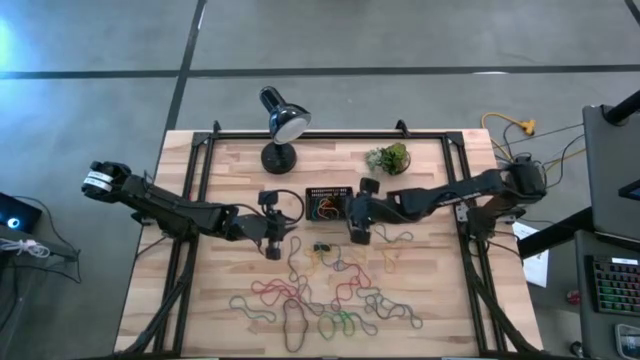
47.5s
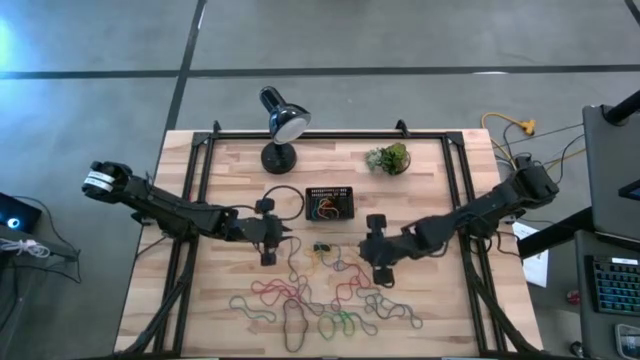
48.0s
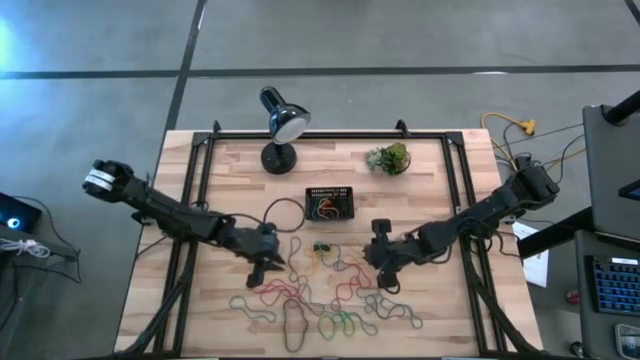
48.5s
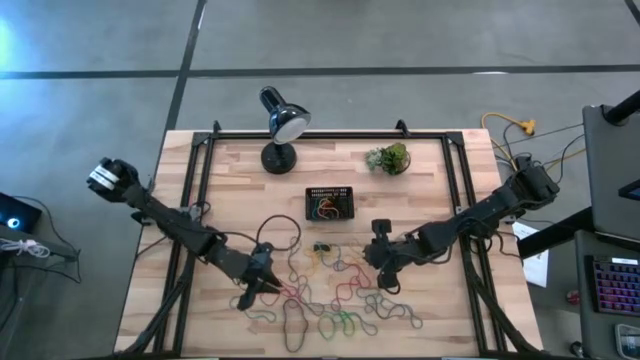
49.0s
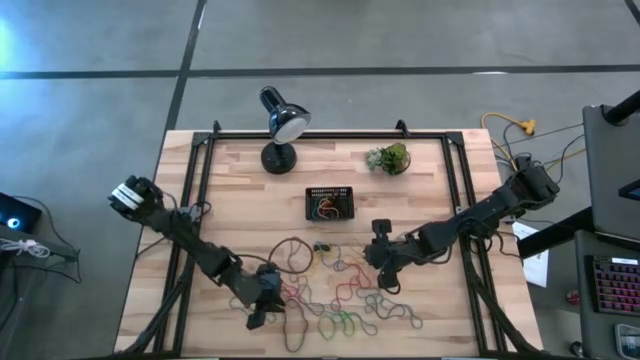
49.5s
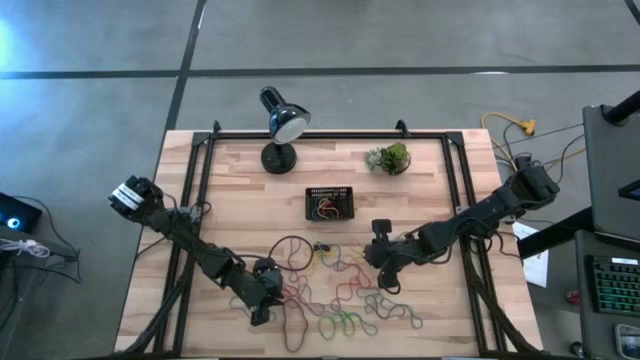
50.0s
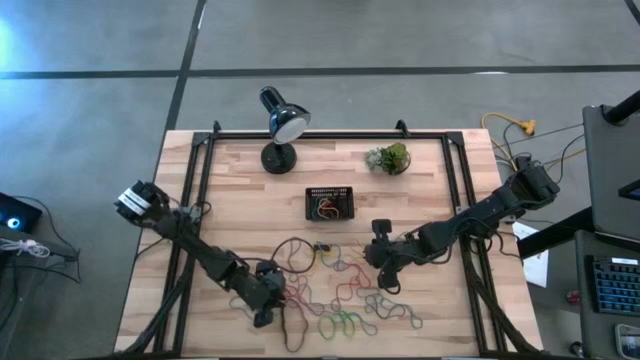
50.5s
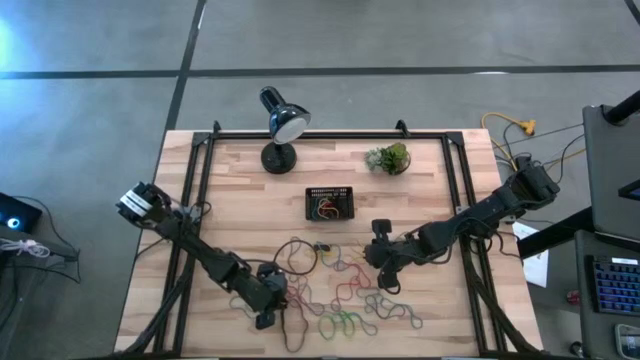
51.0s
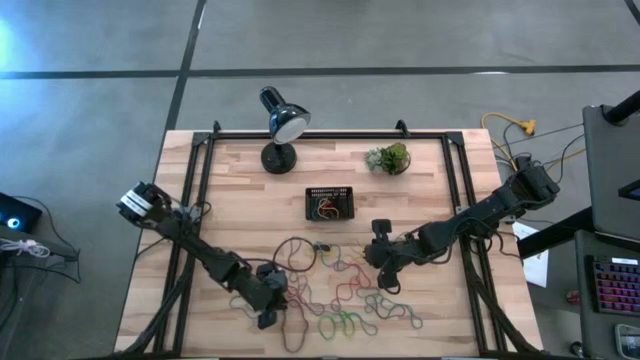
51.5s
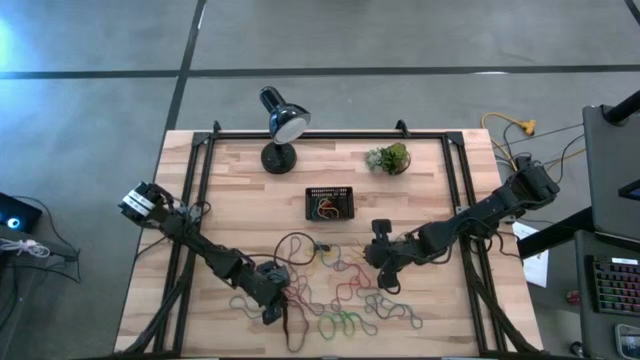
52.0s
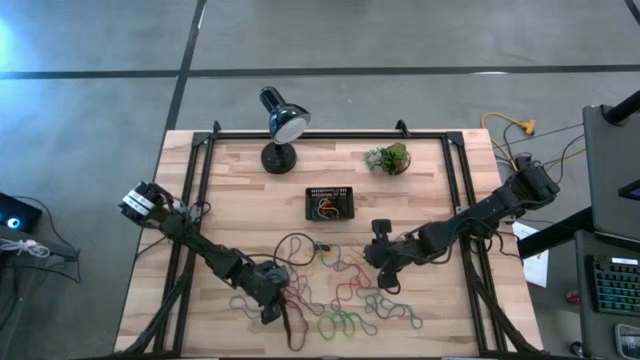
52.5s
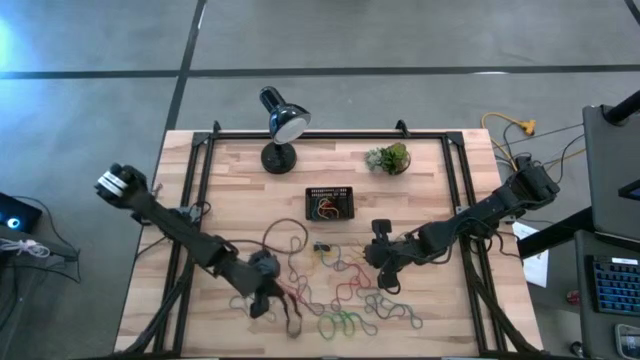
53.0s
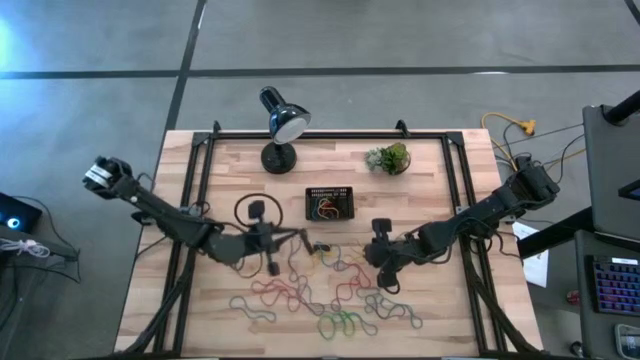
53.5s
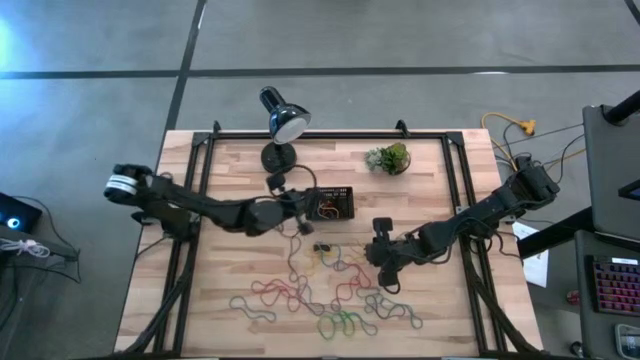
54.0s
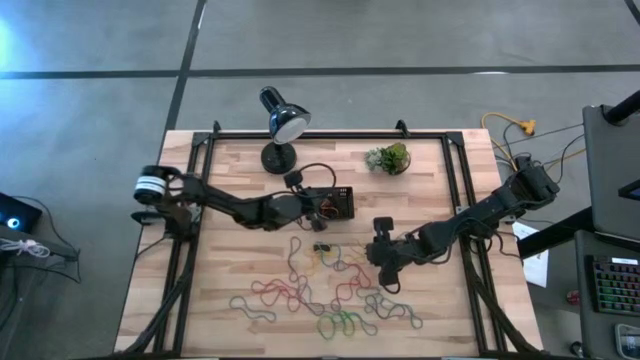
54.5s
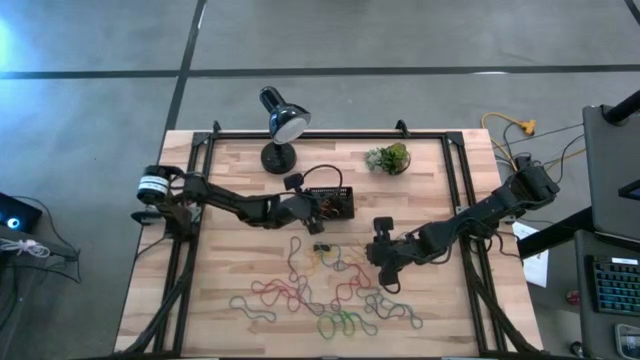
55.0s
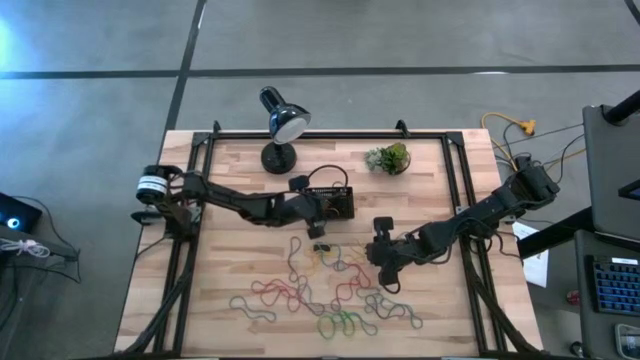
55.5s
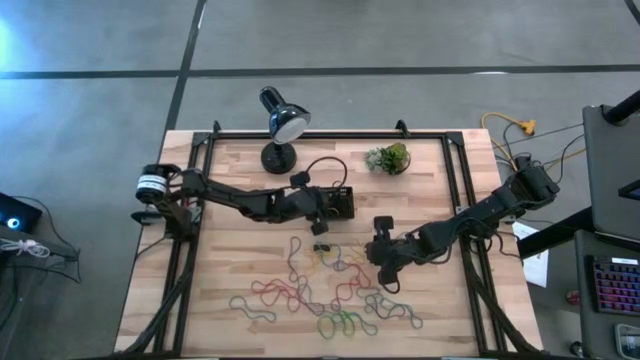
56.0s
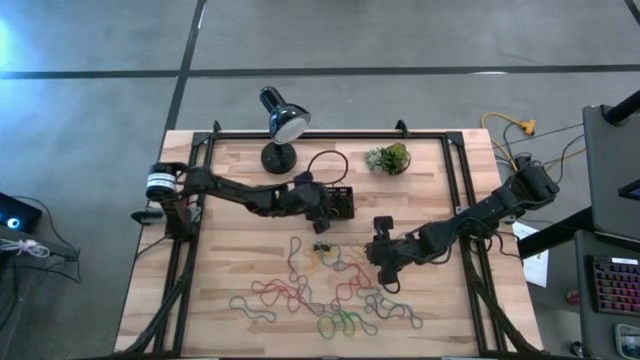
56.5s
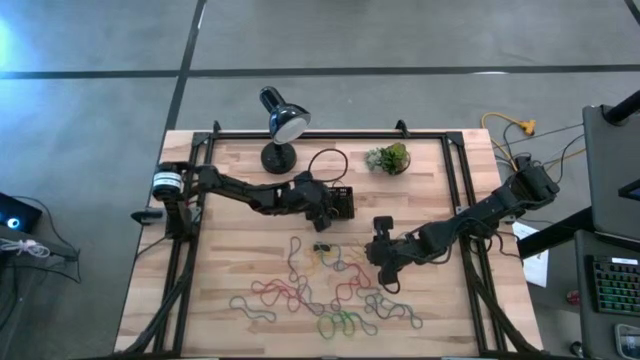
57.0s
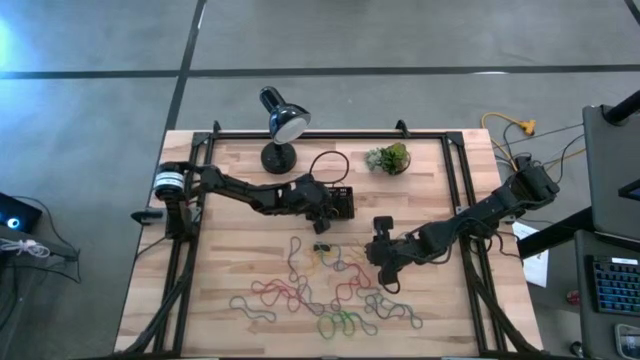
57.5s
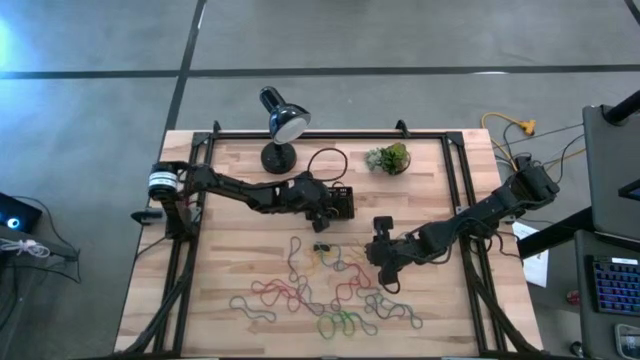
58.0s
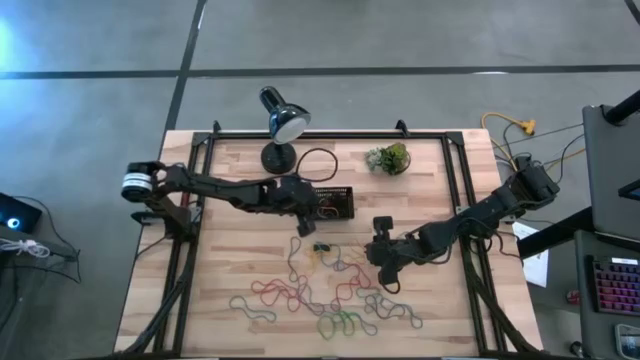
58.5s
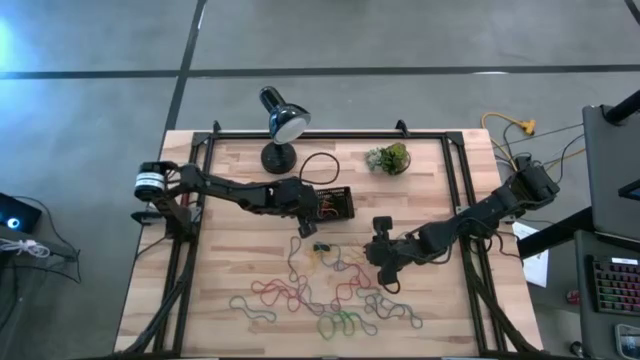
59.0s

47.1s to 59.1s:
Task: Pick and place rubber bands into bin
Put the black rubber band into the black bin

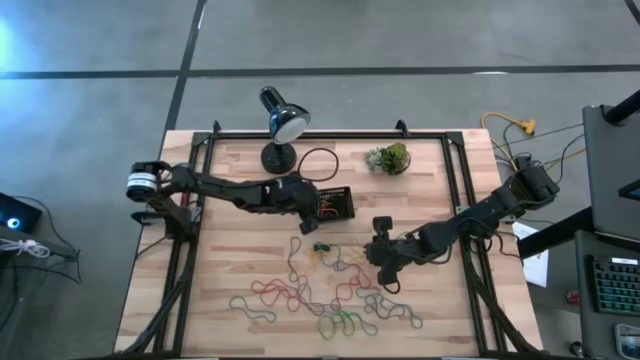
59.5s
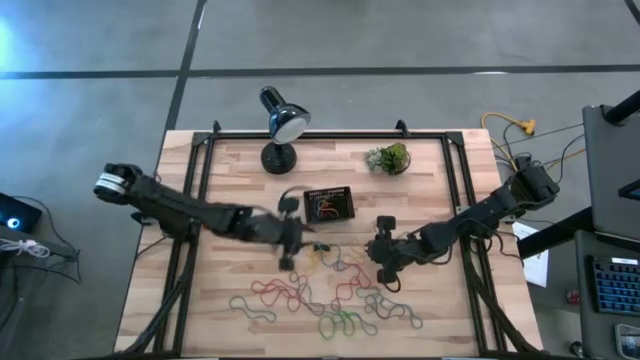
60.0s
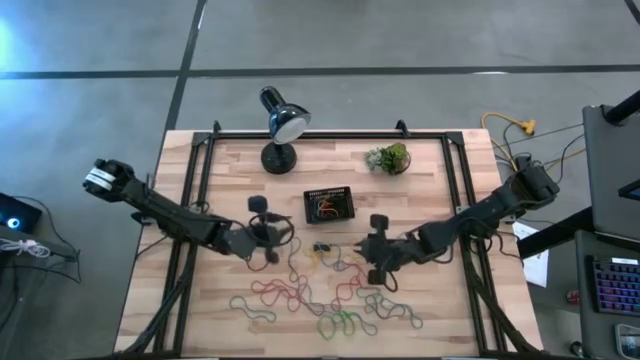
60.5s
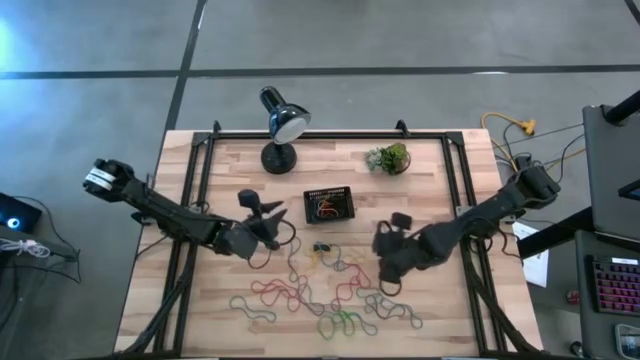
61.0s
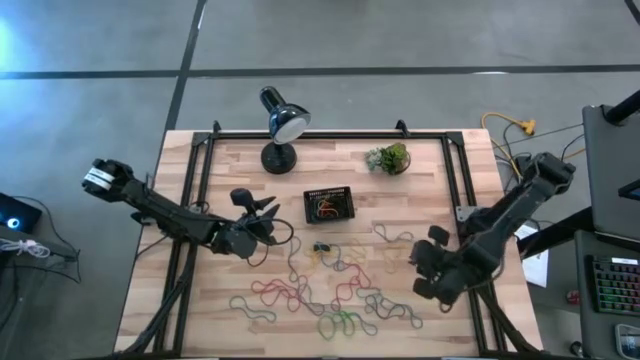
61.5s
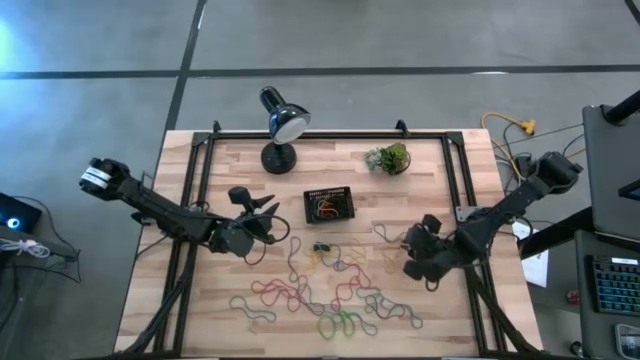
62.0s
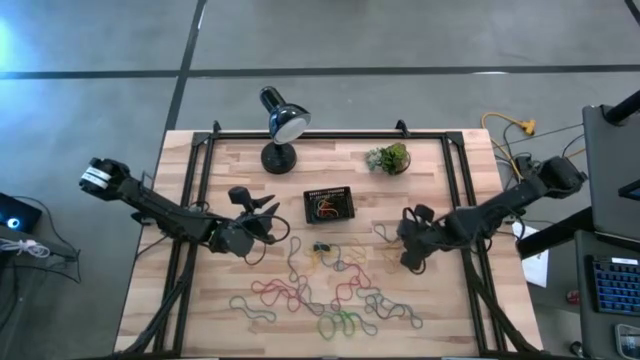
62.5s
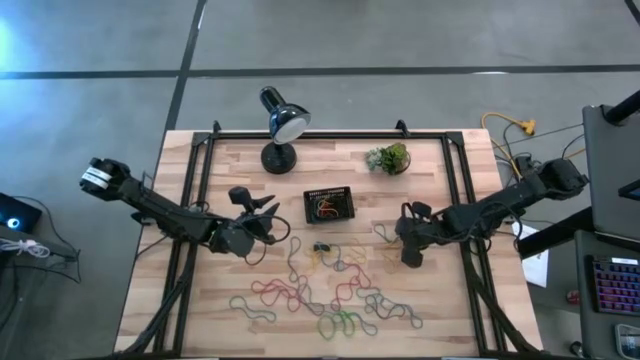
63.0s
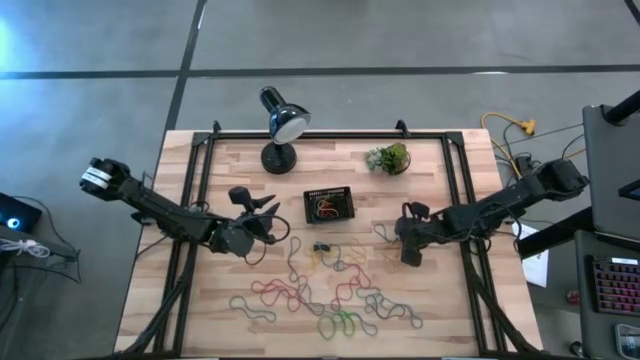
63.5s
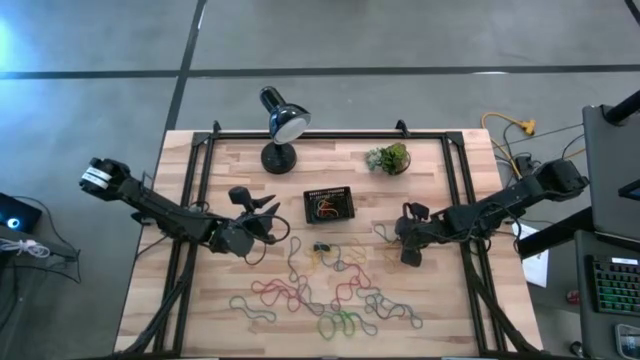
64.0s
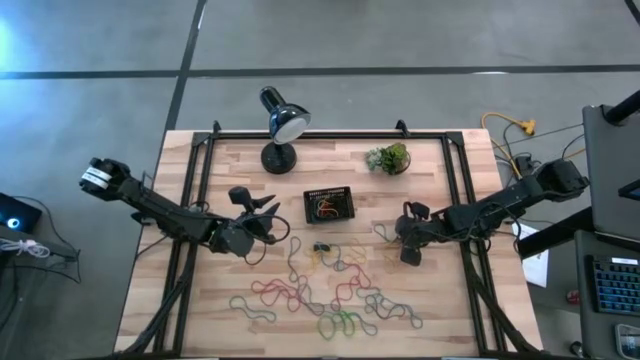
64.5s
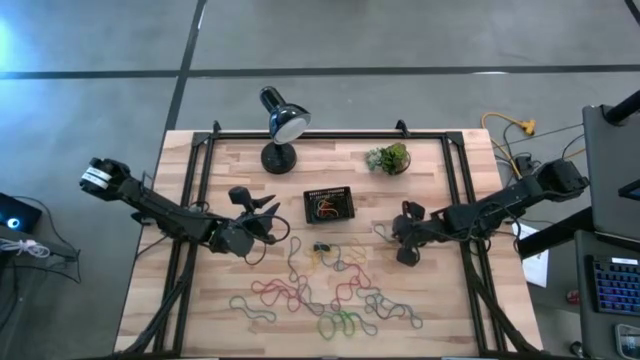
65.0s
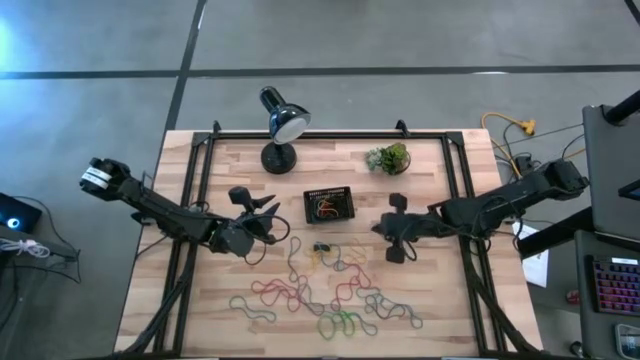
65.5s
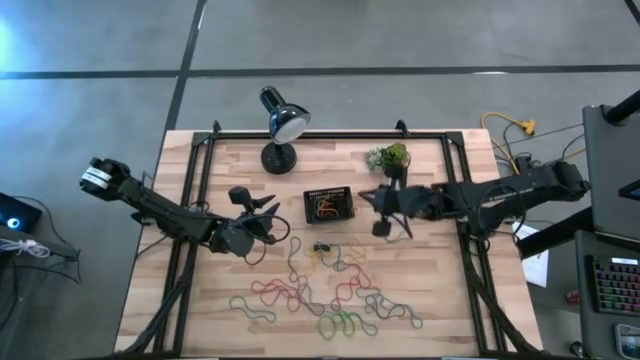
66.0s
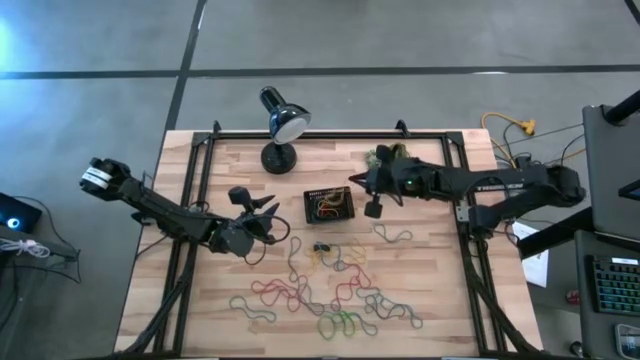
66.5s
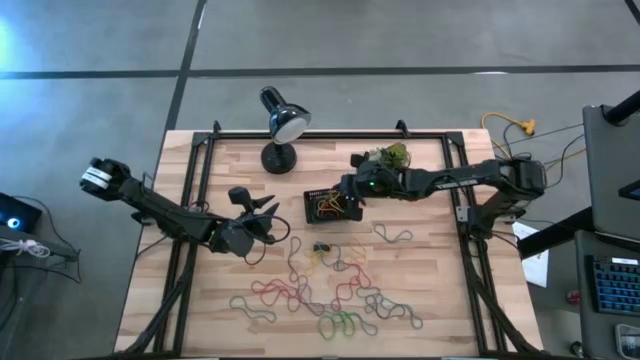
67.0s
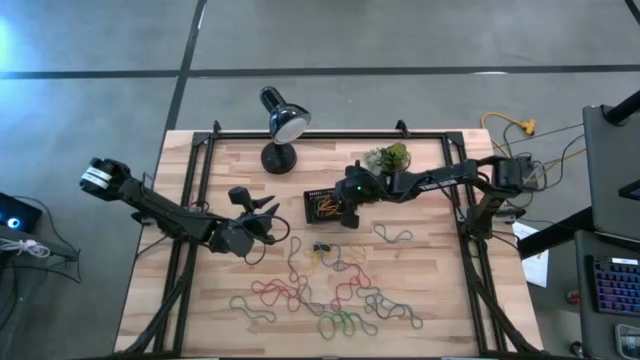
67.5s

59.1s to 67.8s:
Put the yellow rubber band into the black bin

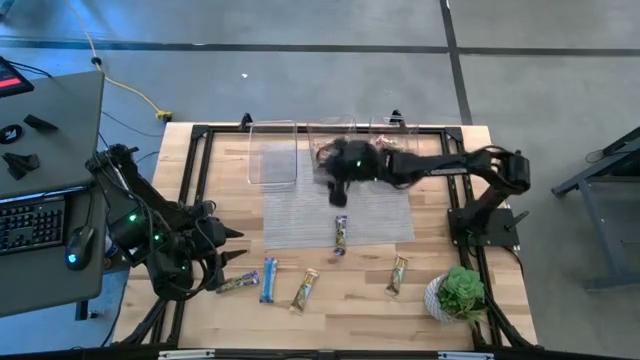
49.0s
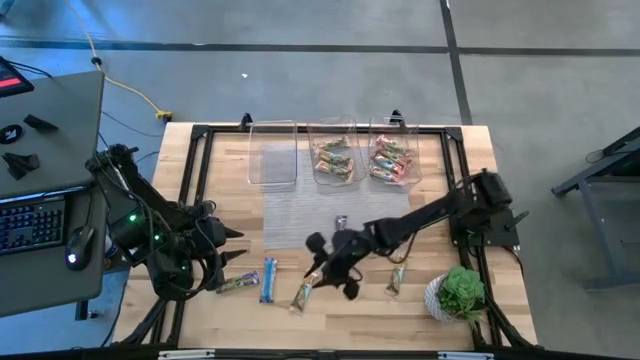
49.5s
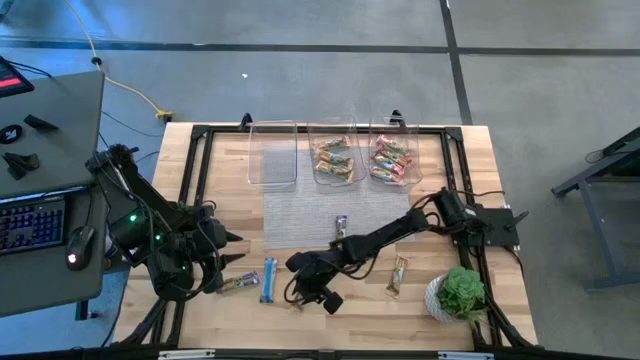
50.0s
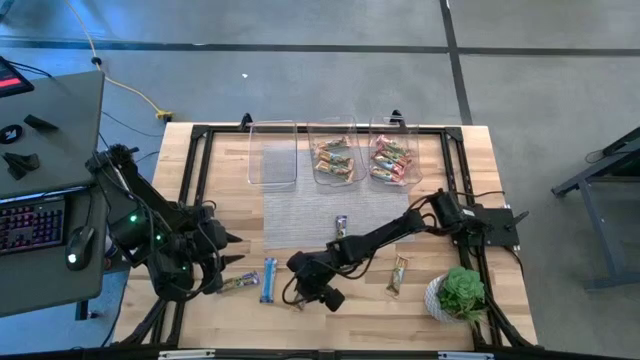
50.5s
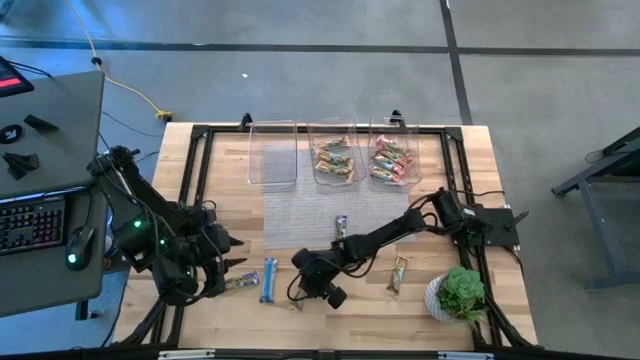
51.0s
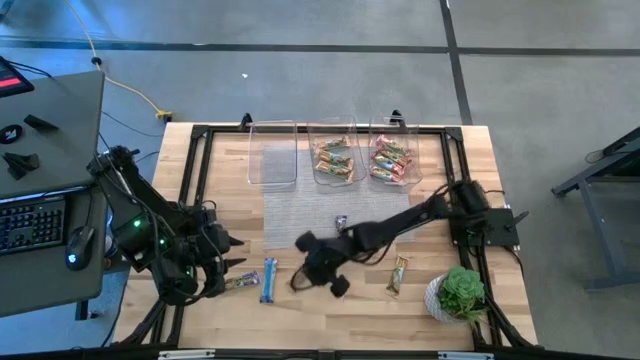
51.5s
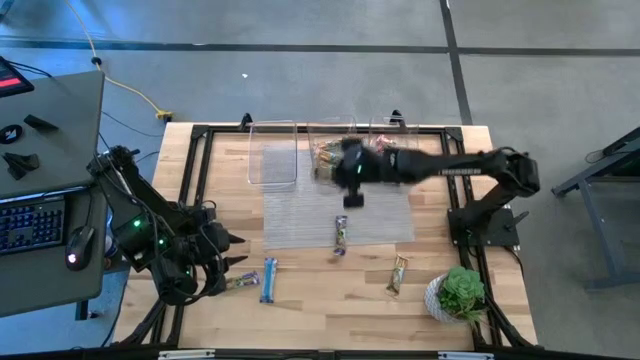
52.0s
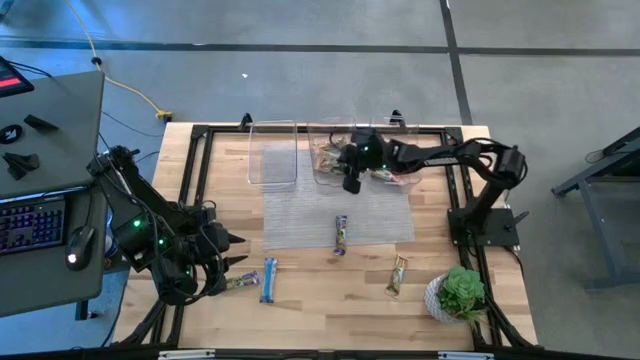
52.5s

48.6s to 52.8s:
Task: Pick and place Granola Bars by type
Put the orange granola bar into the middle transparent bin
